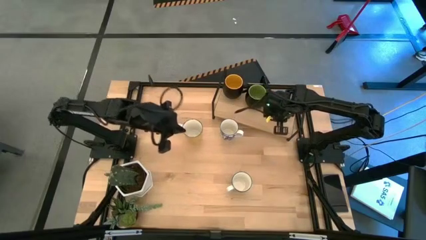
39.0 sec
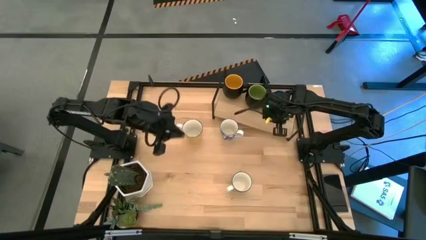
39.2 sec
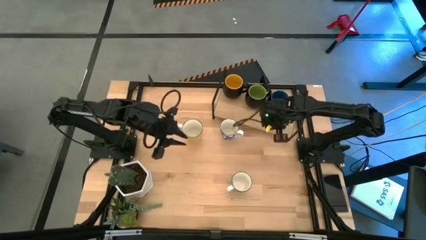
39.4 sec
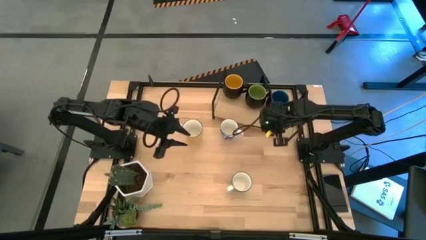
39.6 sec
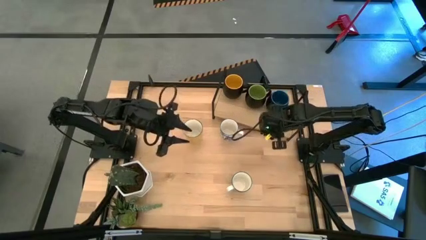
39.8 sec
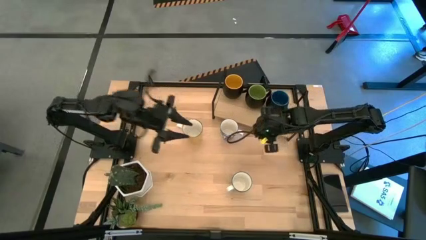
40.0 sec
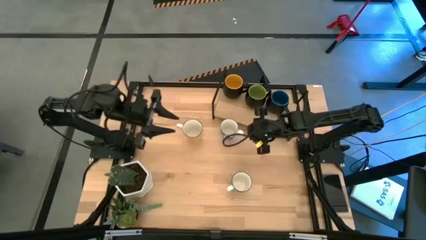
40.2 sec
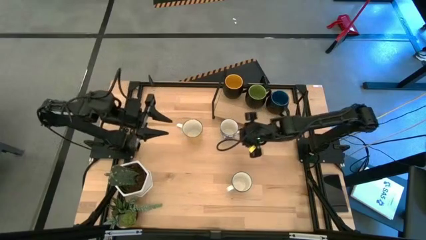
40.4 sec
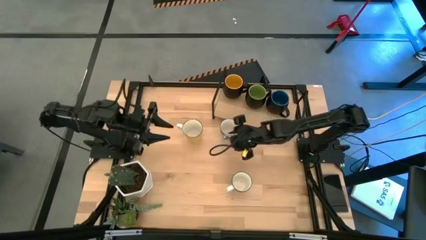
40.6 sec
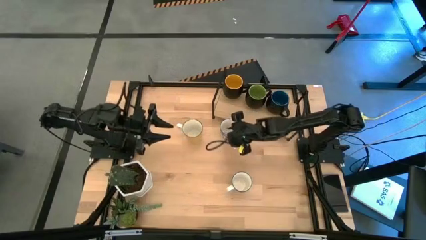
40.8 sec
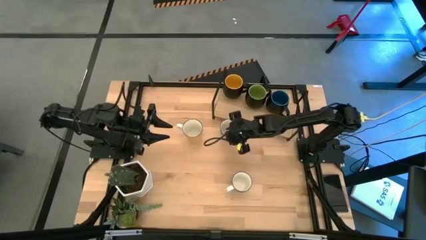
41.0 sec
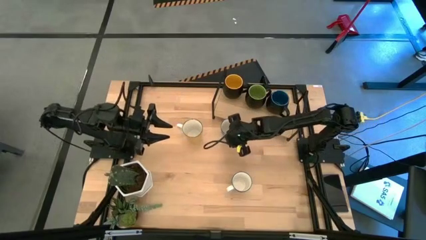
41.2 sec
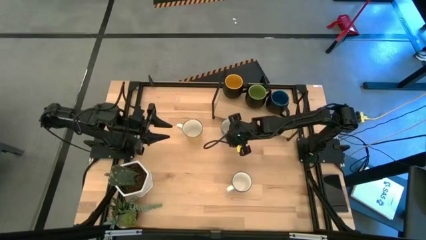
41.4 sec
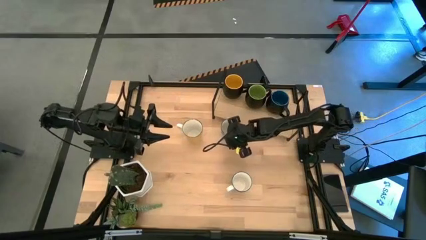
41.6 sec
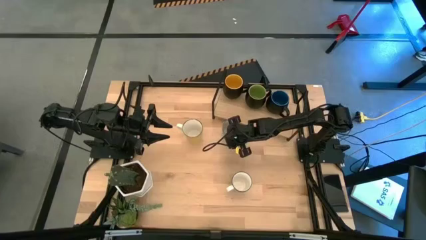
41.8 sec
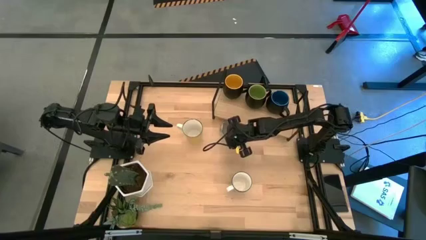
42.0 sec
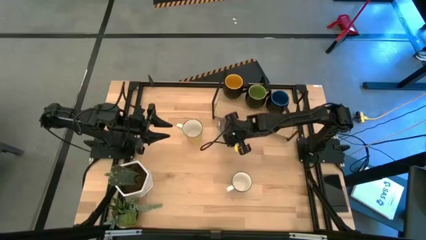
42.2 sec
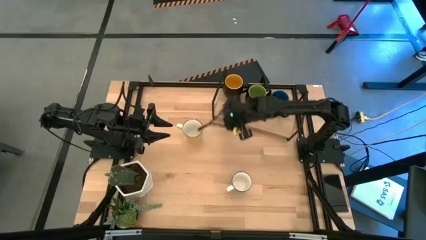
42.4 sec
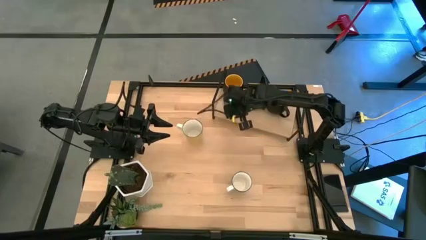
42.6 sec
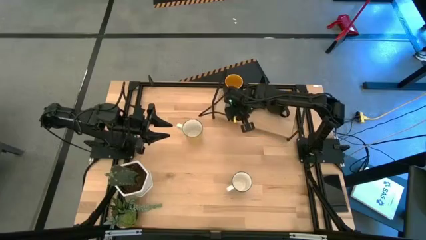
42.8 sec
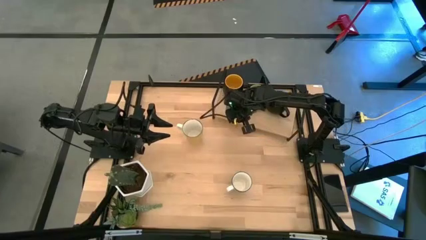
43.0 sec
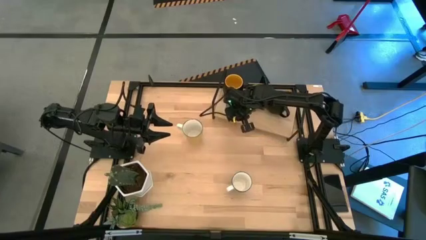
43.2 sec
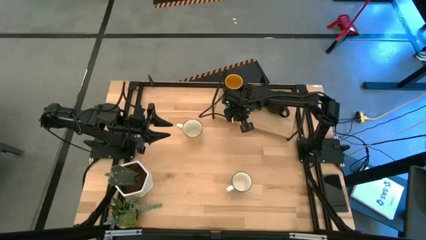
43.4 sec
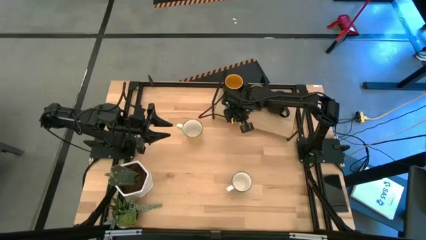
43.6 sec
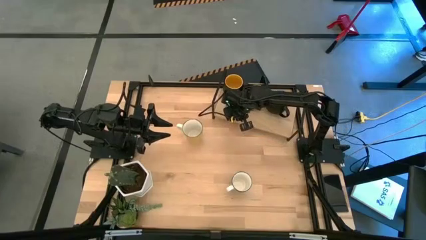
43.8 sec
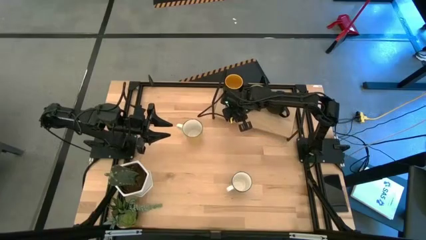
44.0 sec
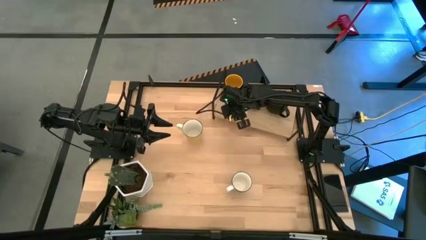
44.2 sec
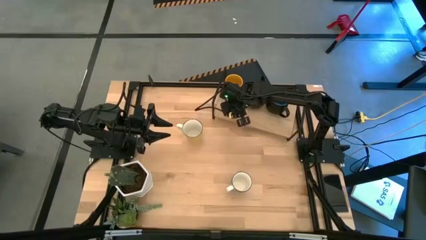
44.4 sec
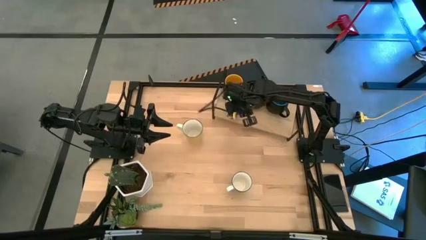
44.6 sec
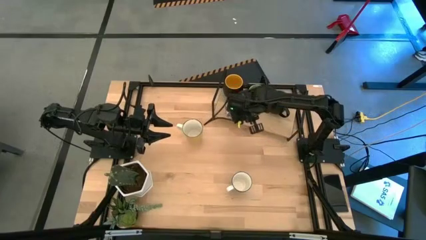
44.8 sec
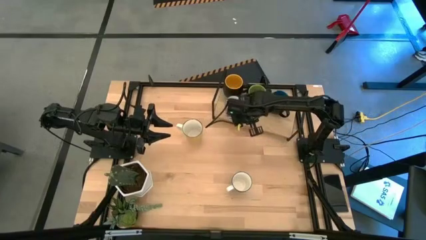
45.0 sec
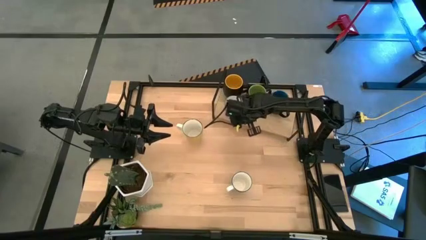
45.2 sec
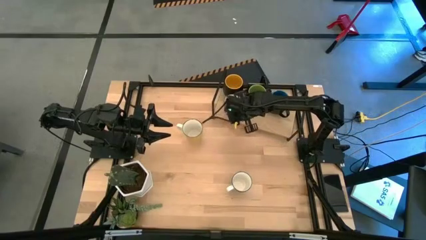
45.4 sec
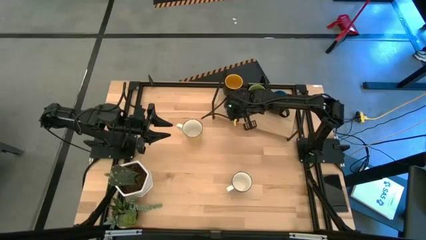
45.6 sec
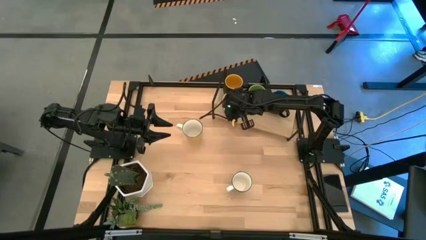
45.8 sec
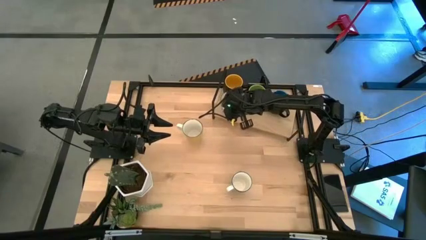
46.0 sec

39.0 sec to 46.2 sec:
Task: Place coffee mugs
Put the top blue patterned mug on the shelf

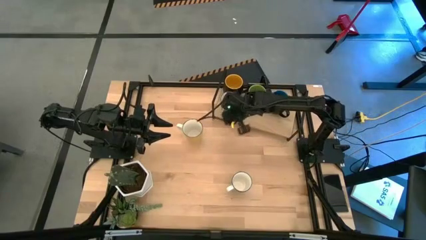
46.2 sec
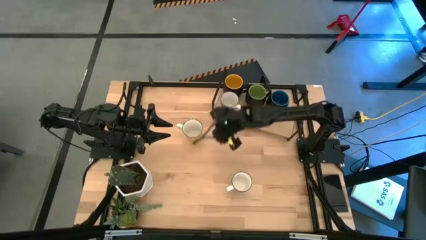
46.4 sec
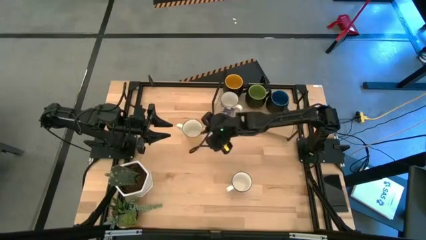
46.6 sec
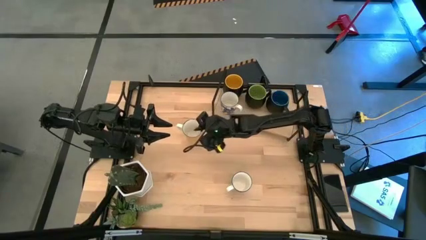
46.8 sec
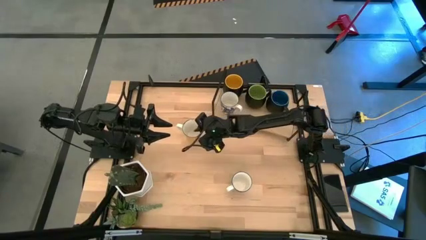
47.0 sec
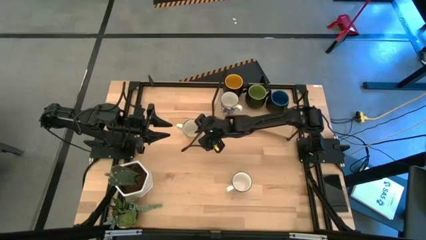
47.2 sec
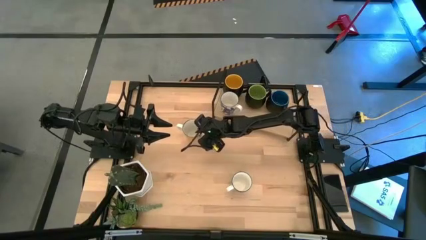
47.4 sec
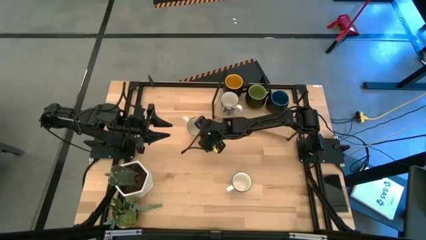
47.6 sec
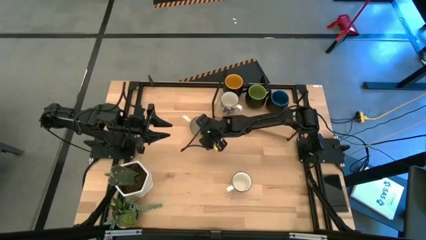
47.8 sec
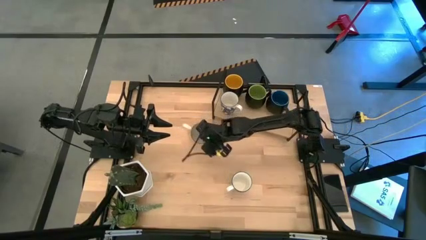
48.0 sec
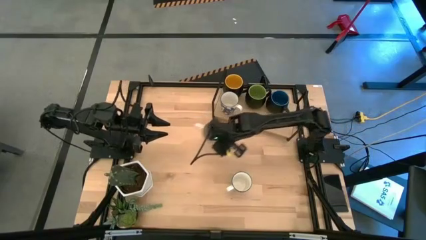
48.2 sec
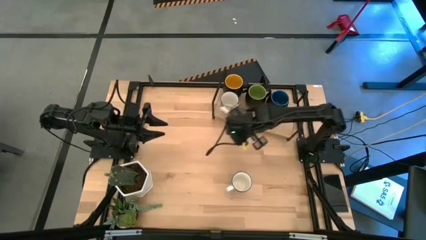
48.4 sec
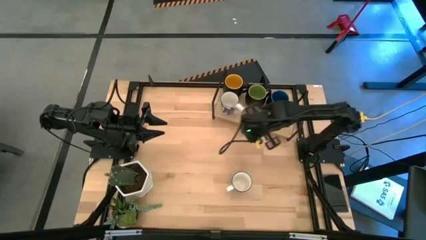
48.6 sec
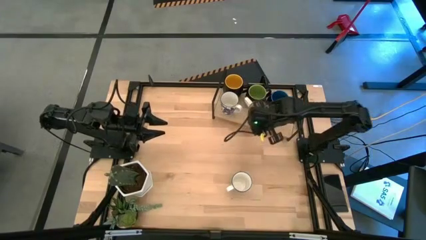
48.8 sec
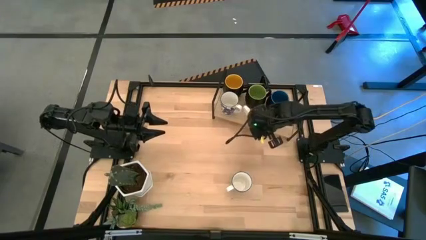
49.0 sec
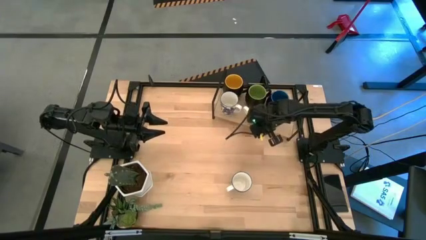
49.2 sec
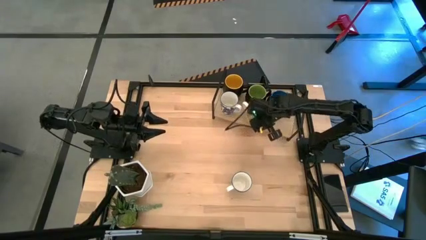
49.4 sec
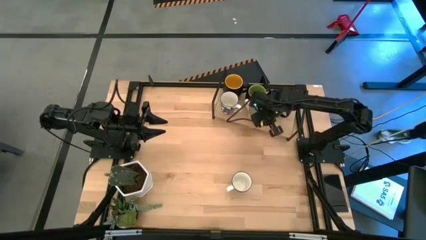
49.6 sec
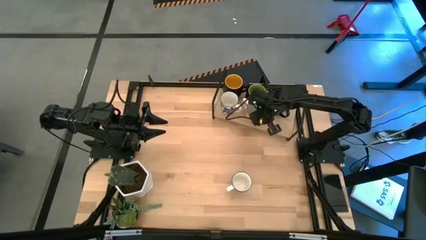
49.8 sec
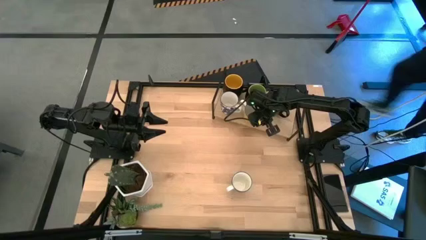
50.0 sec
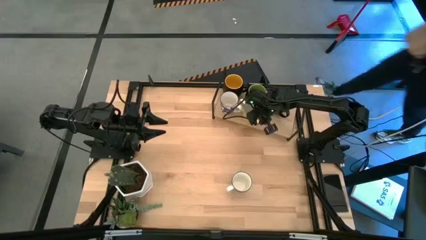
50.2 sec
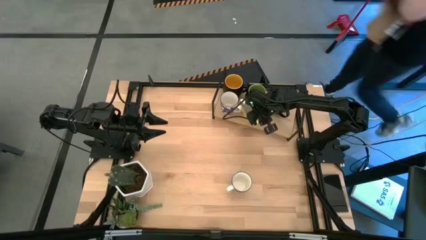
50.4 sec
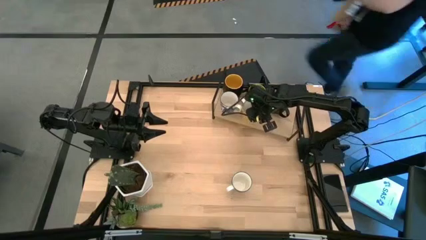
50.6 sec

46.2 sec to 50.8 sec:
Put the yellow mug on the shelf

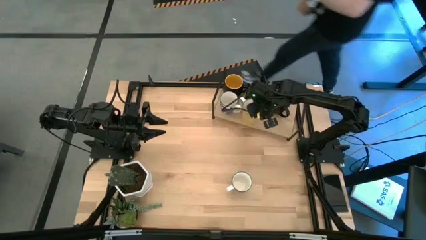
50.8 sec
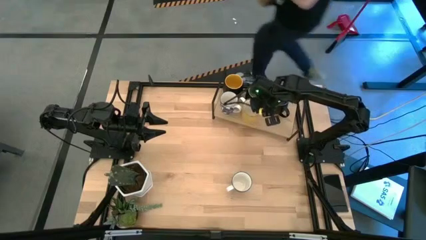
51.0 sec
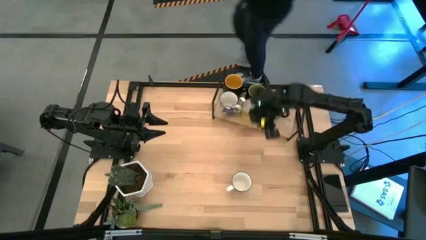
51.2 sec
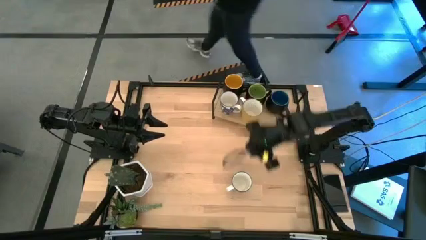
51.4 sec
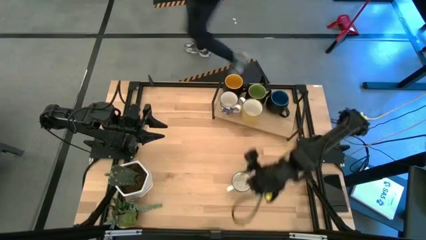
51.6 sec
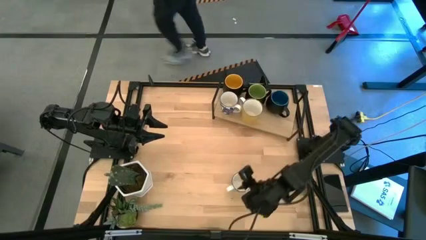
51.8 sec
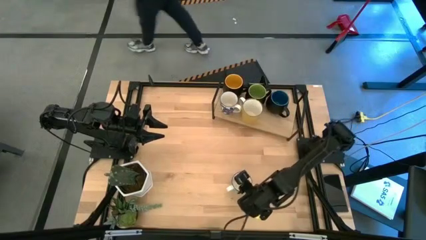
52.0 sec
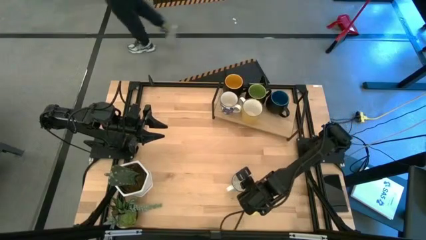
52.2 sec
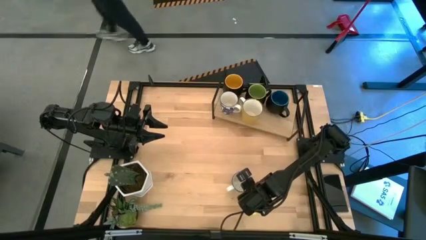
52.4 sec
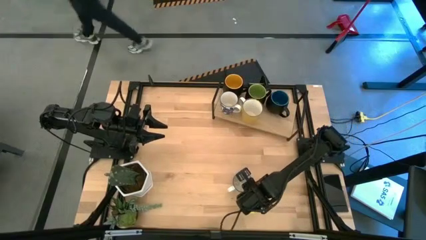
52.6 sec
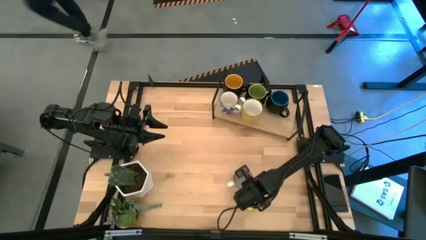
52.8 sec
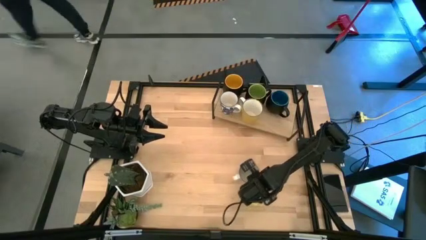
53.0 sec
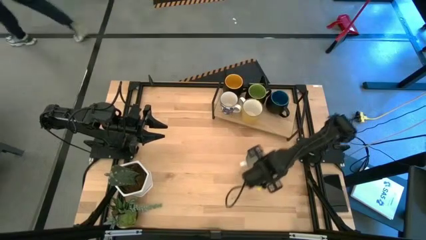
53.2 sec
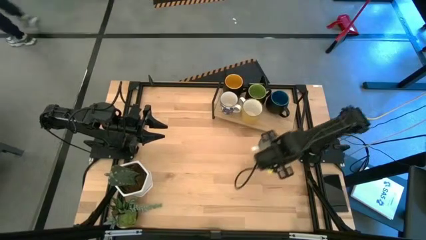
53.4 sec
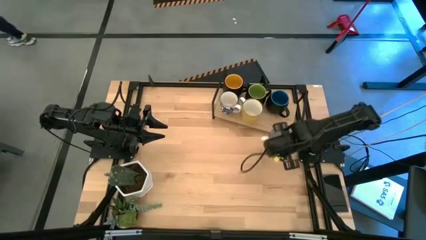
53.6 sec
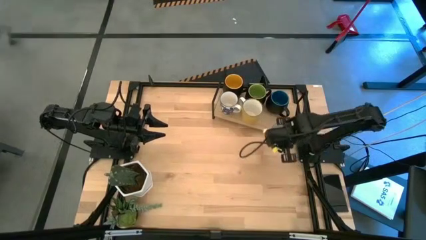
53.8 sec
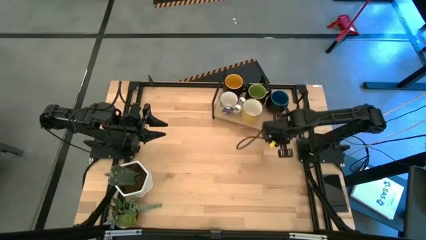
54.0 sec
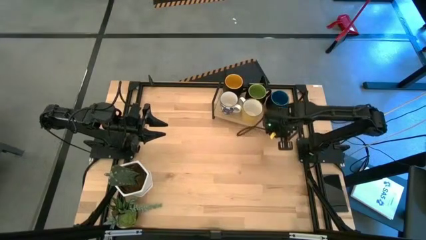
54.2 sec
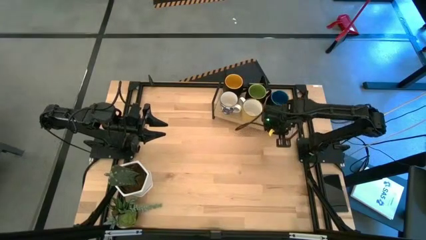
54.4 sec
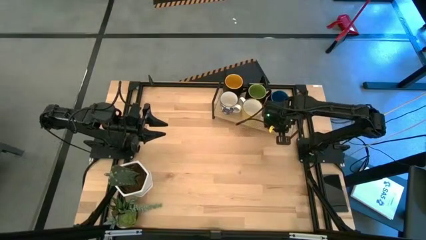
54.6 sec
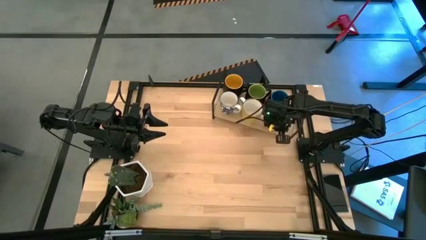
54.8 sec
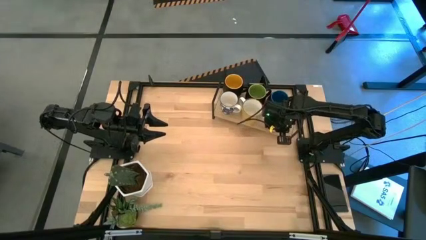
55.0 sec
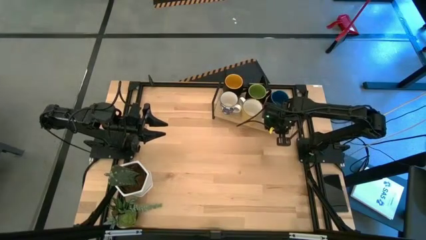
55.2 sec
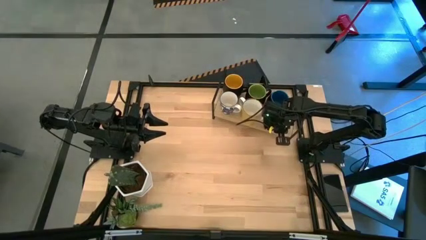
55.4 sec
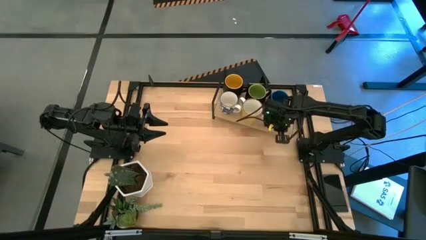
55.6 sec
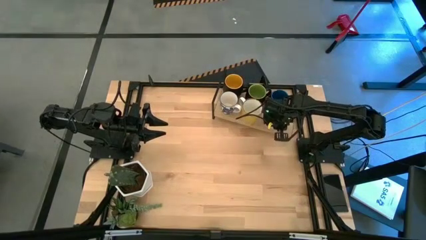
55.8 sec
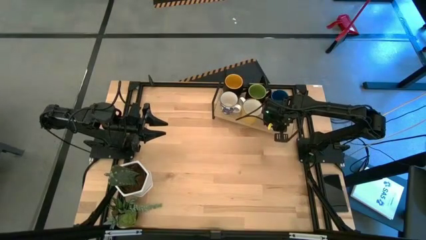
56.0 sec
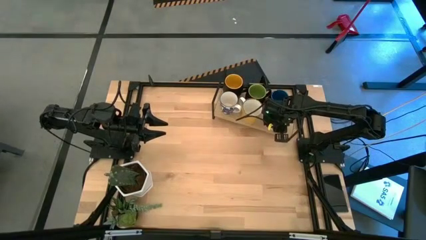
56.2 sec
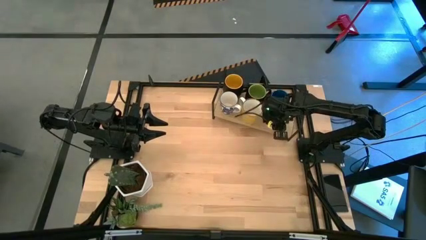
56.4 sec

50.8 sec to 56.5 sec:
Put the blue patterned mug on the shelf
